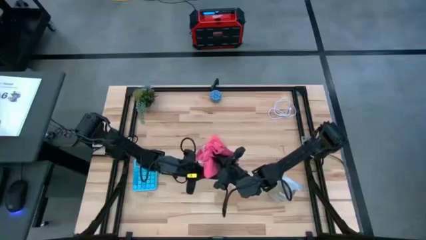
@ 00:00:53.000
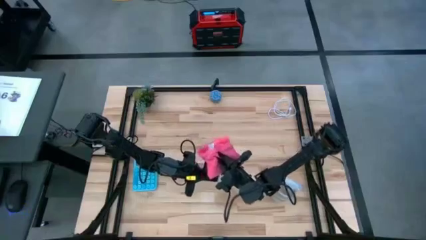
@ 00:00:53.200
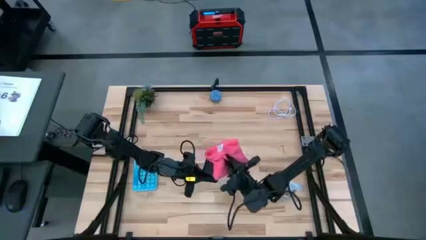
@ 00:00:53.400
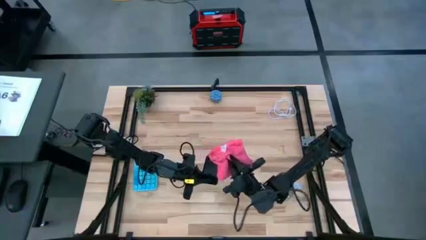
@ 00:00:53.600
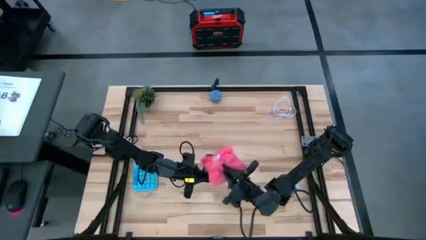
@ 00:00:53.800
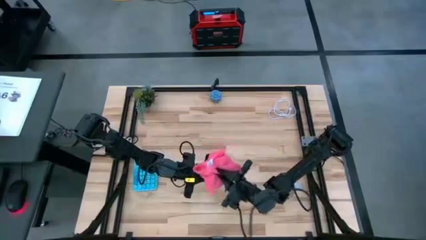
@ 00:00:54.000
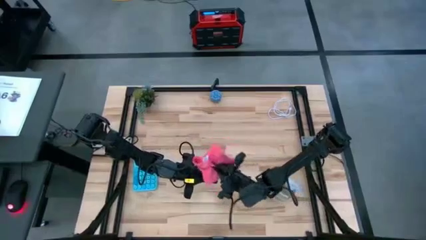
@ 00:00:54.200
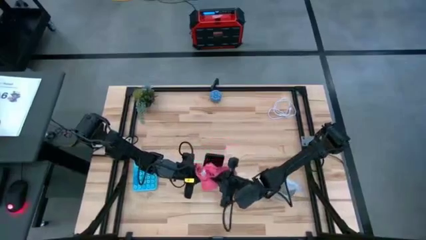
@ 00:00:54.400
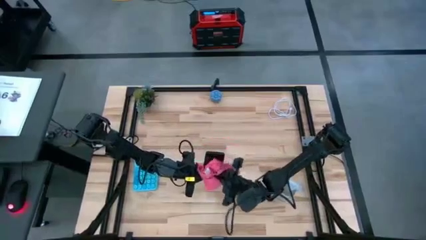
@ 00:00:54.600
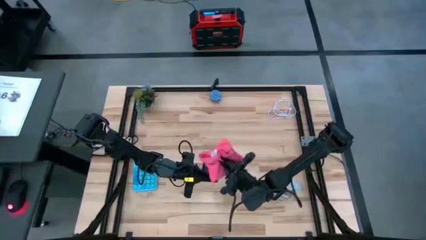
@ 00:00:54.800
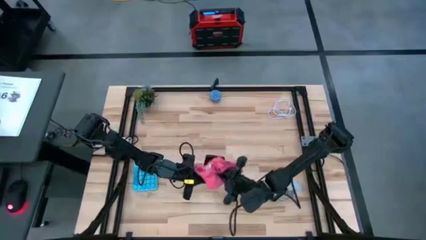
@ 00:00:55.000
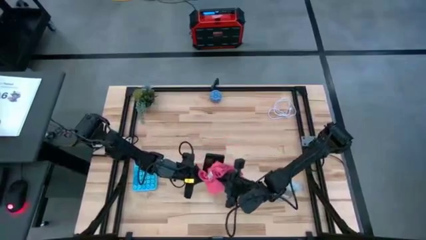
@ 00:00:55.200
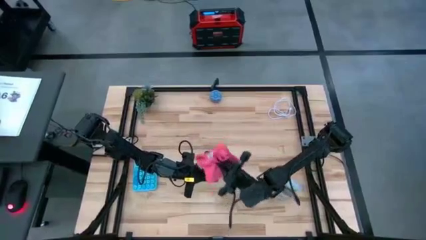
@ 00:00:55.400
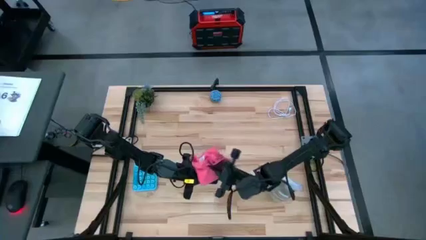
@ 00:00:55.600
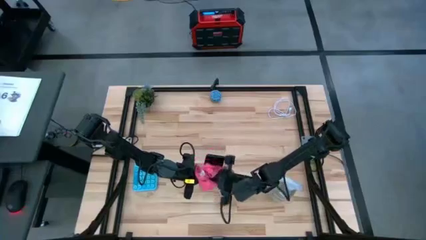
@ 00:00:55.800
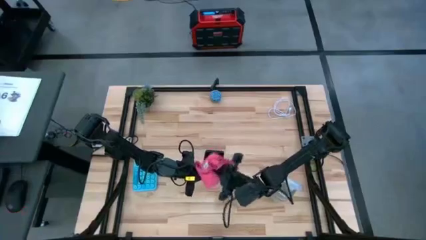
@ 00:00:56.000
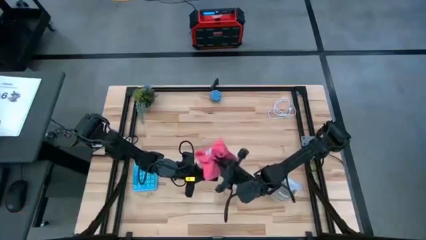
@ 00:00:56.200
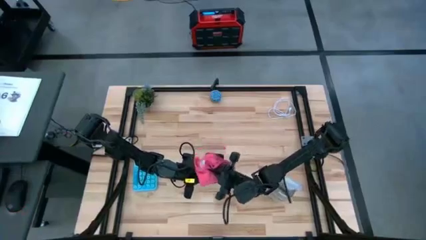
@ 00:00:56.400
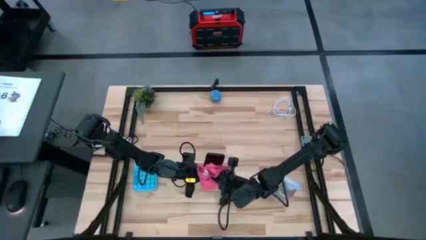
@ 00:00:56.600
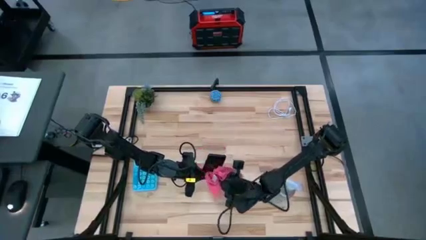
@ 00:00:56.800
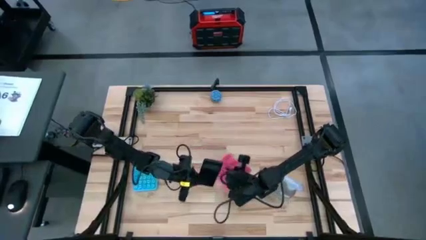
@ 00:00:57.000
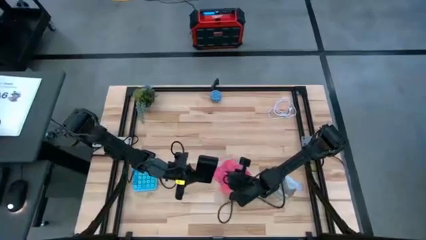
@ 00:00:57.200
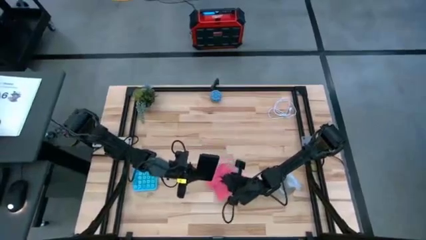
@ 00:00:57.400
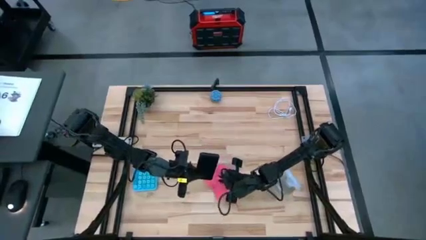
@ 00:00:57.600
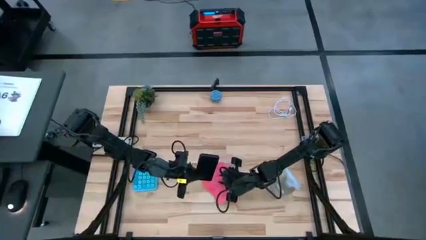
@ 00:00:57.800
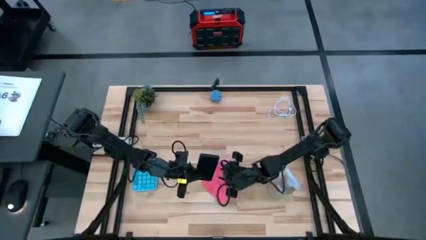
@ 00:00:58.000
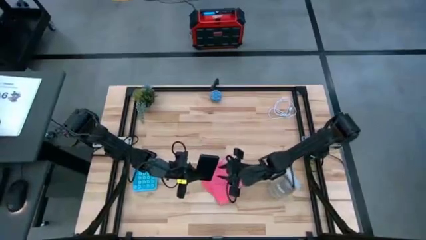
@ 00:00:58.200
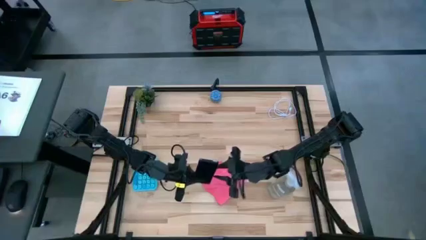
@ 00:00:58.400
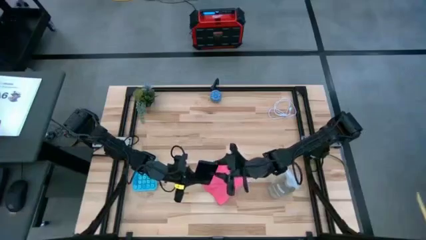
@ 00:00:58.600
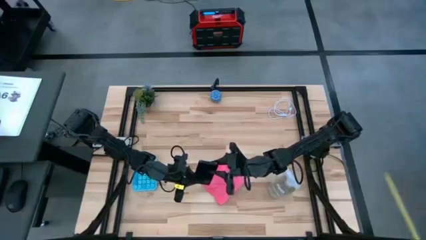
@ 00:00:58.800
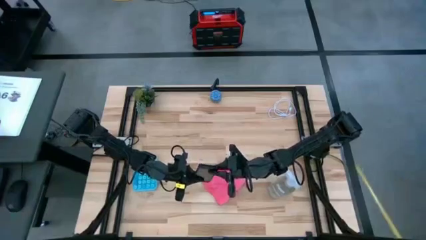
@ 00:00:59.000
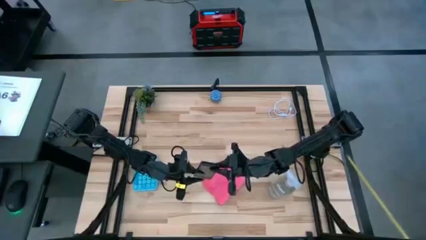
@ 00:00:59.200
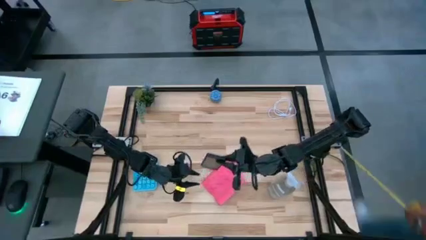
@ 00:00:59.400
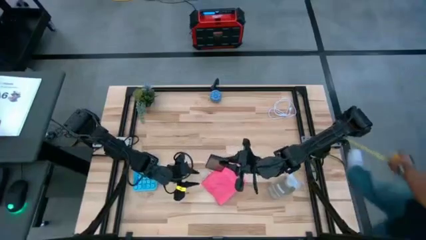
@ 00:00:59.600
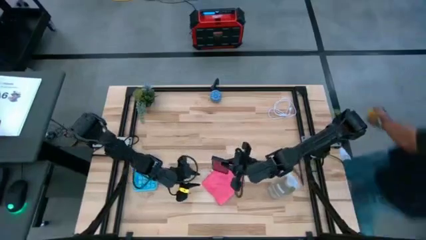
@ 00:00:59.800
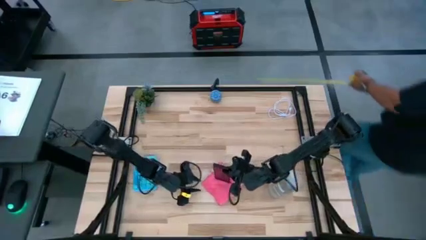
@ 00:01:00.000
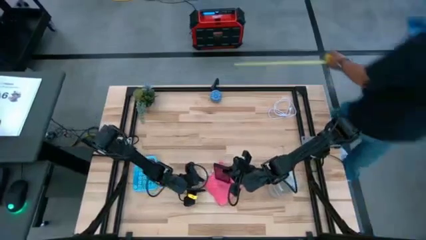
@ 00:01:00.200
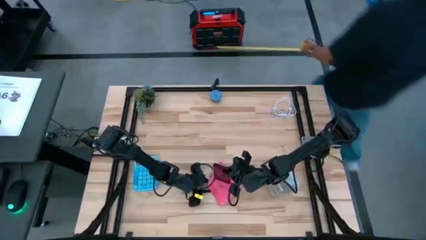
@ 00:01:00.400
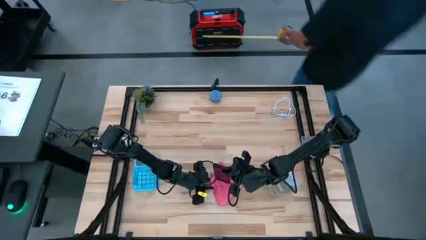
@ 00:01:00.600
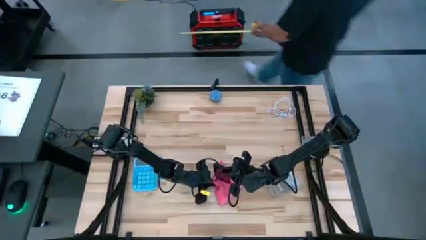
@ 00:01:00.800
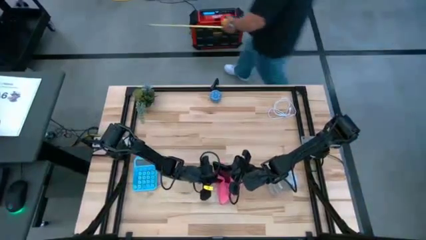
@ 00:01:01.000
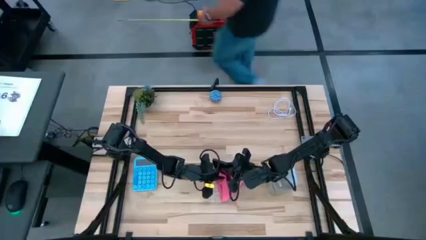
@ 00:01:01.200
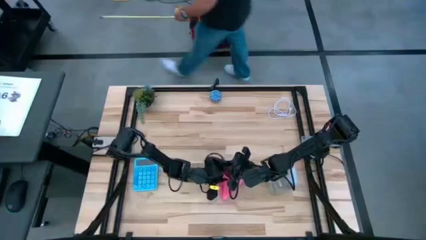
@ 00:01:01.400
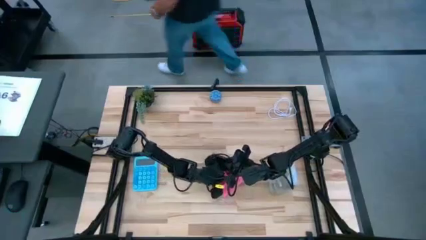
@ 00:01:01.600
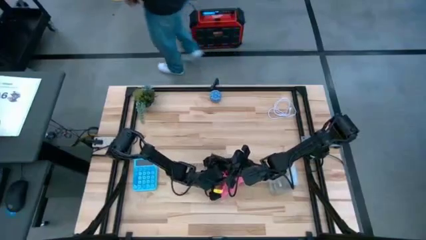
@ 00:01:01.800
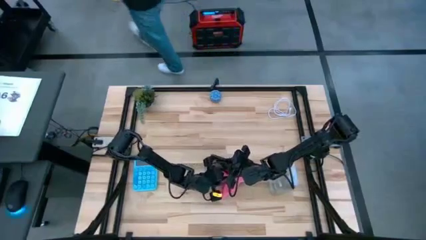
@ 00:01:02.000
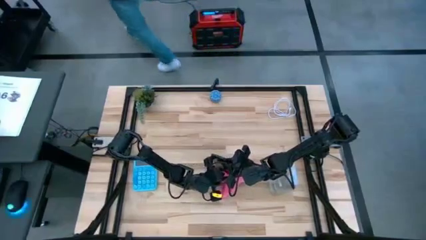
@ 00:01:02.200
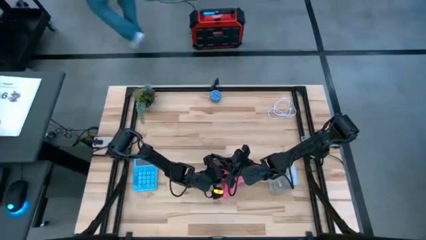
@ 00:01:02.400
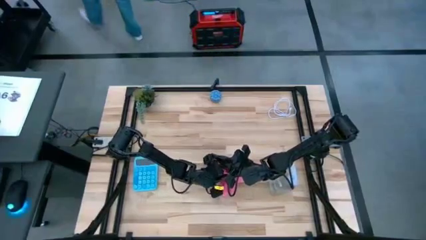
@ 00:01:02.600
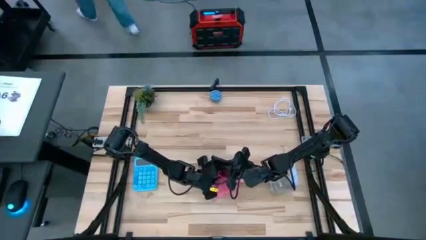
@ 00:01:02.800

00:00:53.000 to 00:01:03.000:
Task: Apply microfiber cloth
Wipe the black cellphone with the pink microfiber cloth
